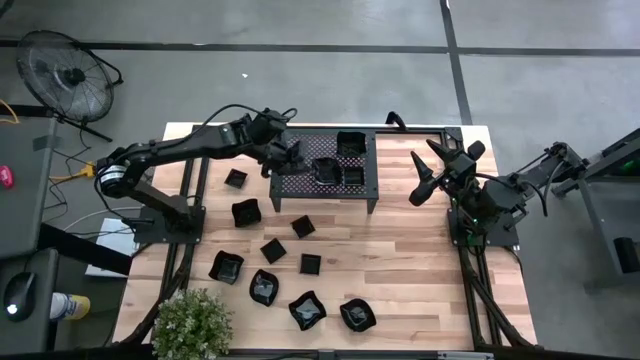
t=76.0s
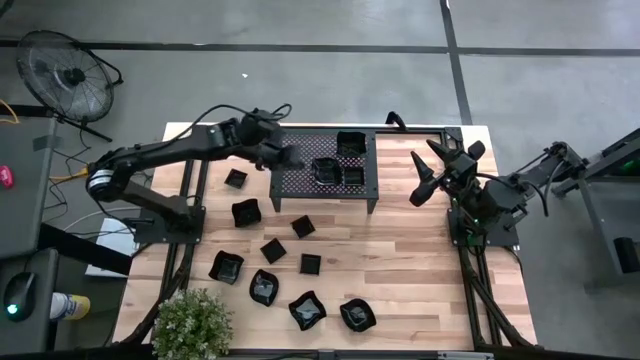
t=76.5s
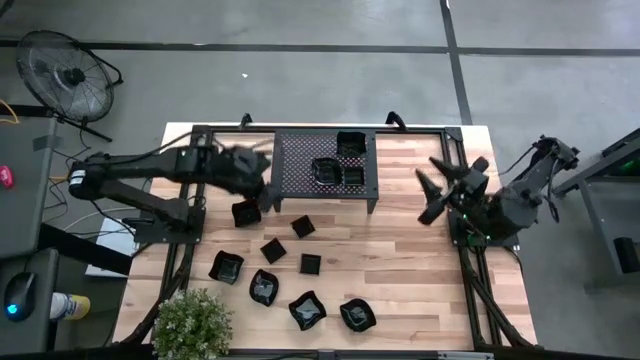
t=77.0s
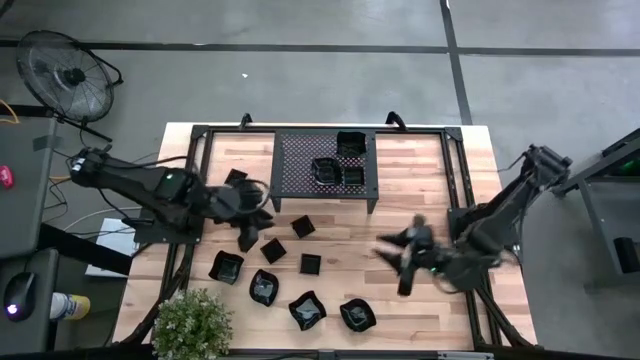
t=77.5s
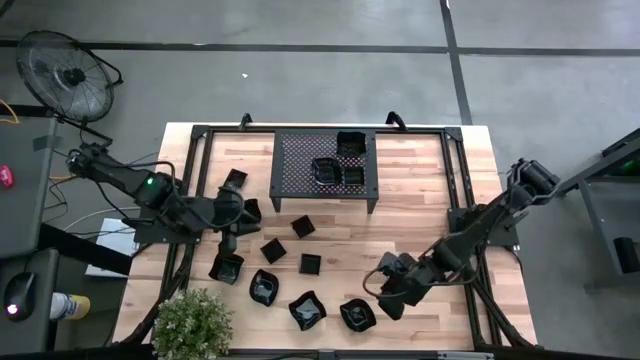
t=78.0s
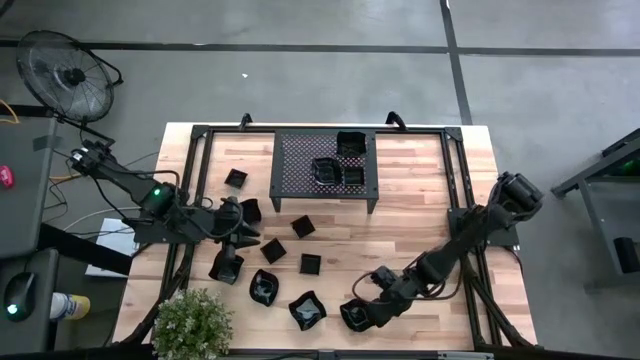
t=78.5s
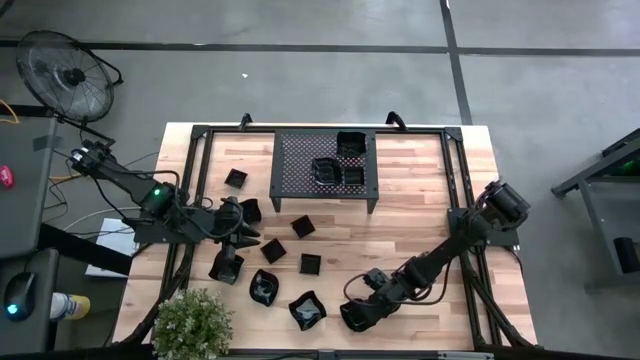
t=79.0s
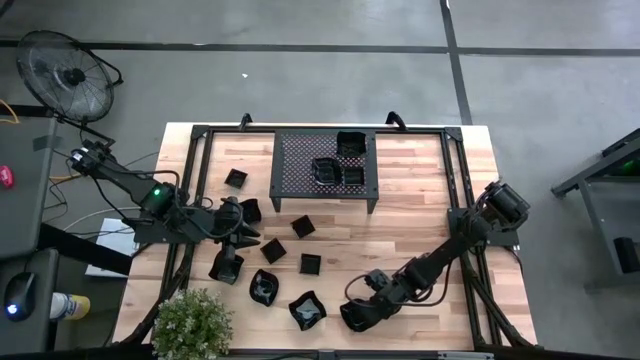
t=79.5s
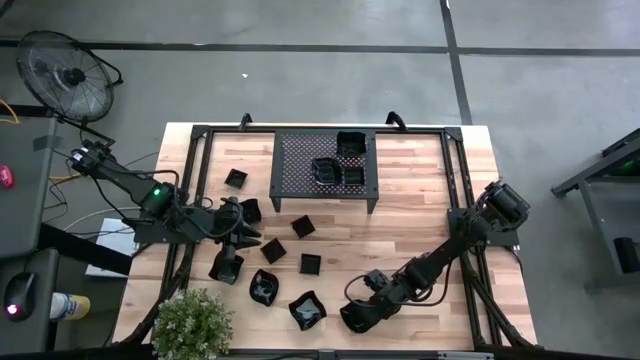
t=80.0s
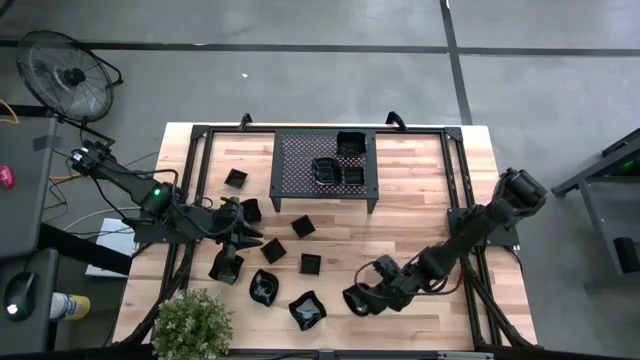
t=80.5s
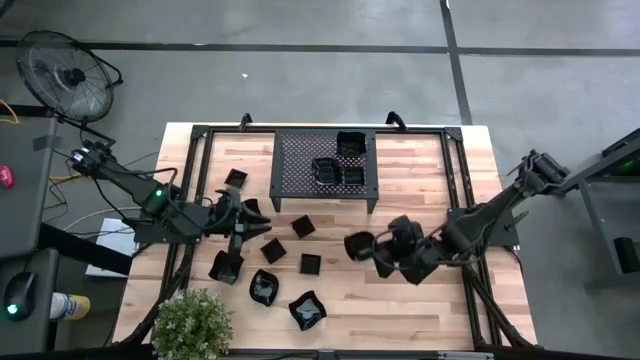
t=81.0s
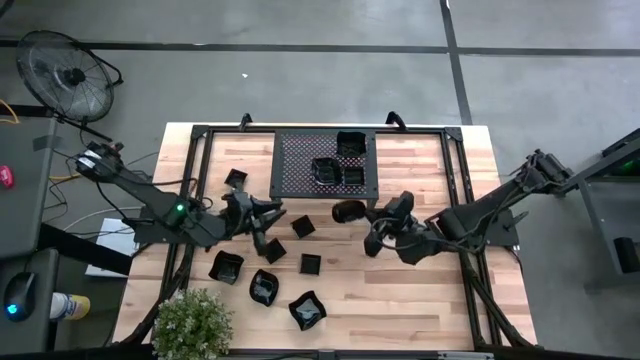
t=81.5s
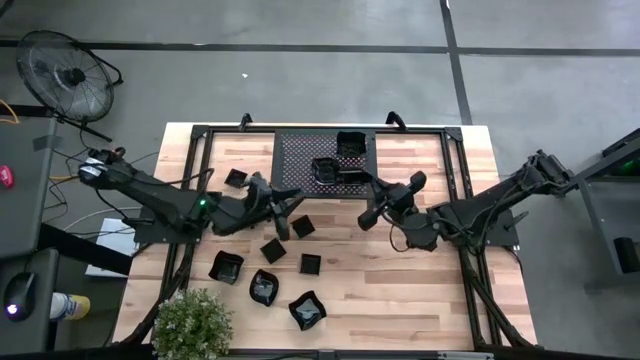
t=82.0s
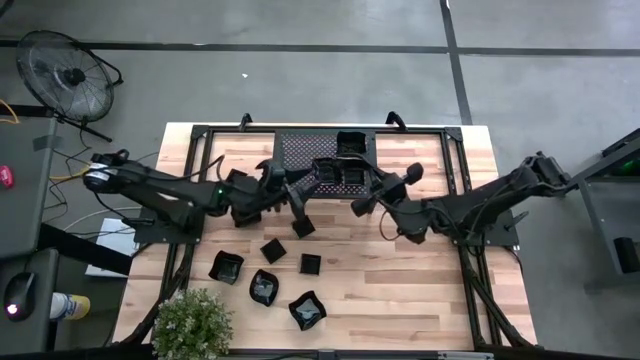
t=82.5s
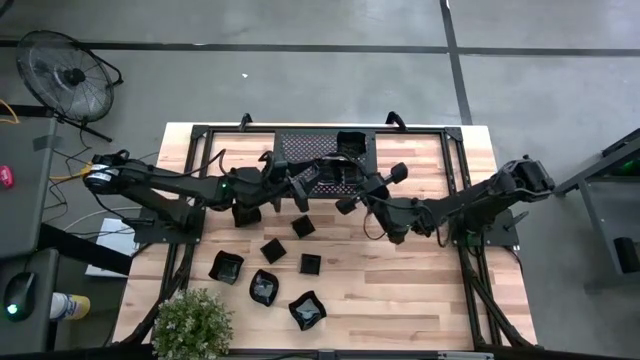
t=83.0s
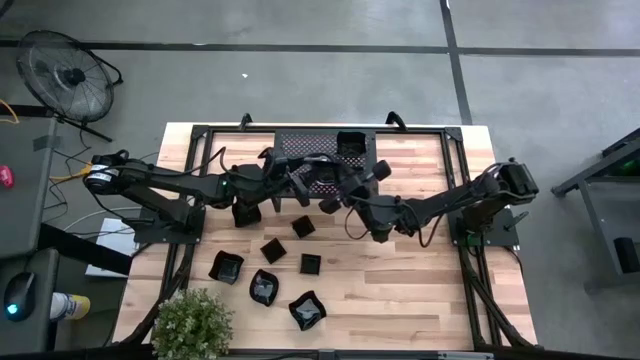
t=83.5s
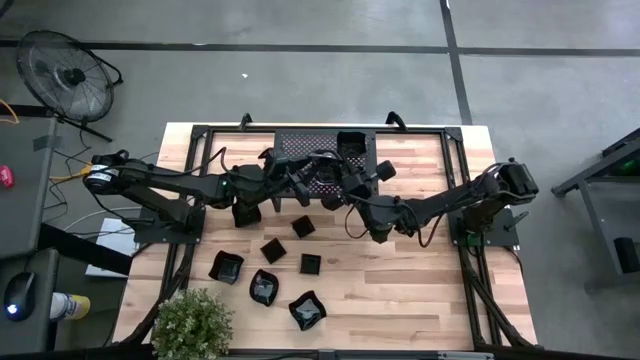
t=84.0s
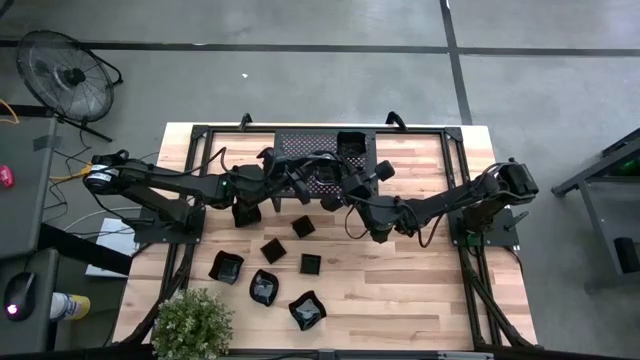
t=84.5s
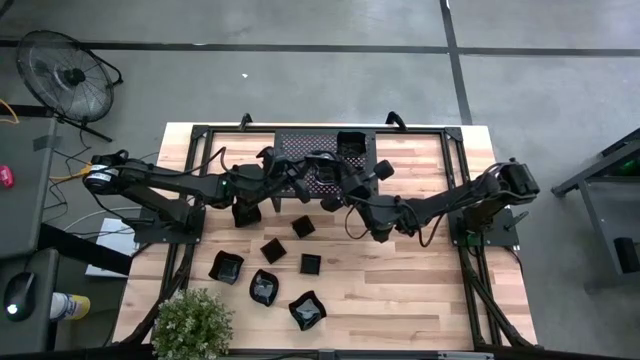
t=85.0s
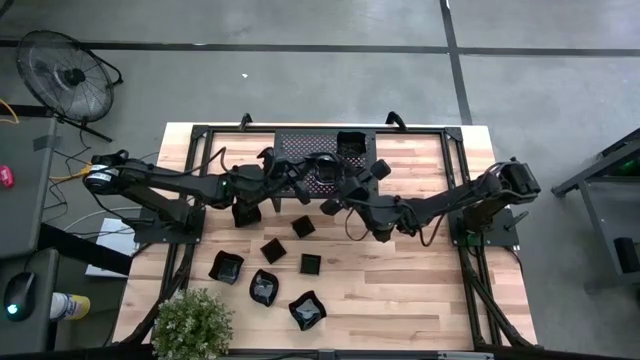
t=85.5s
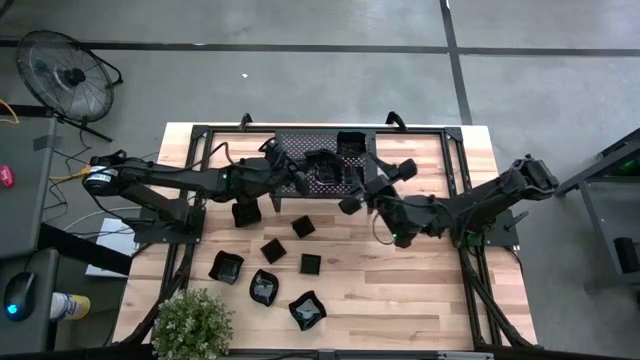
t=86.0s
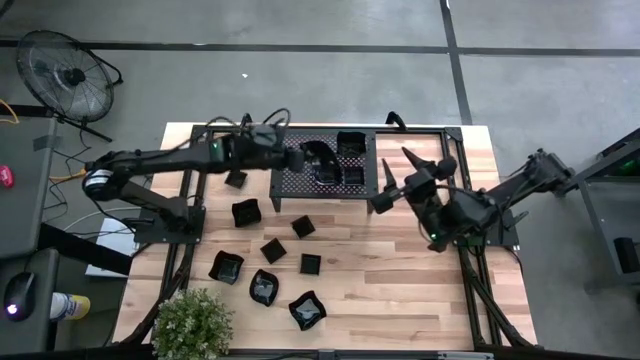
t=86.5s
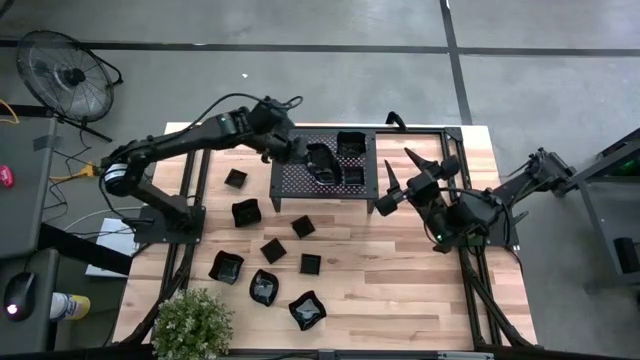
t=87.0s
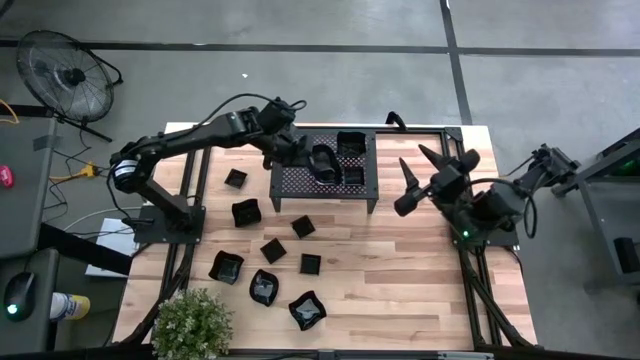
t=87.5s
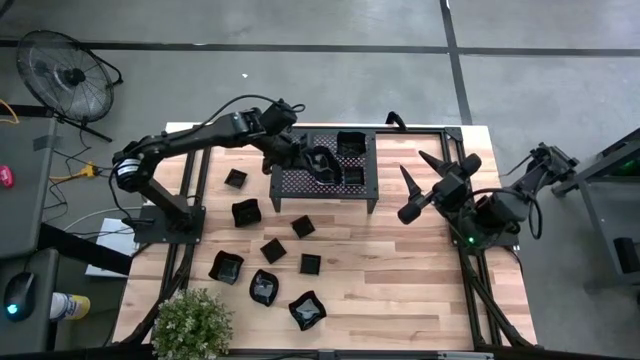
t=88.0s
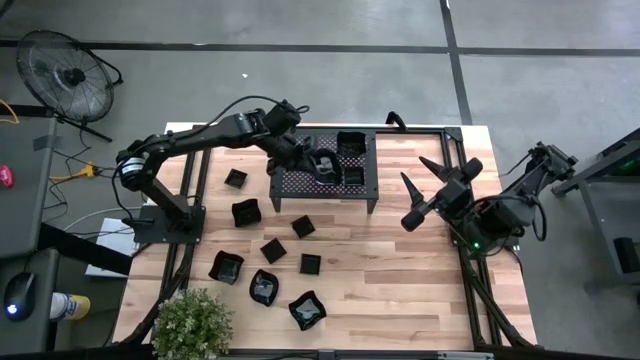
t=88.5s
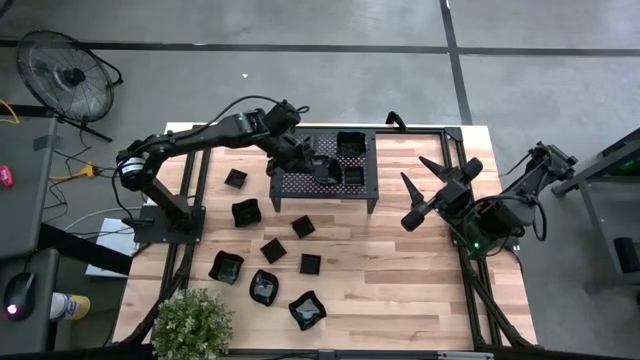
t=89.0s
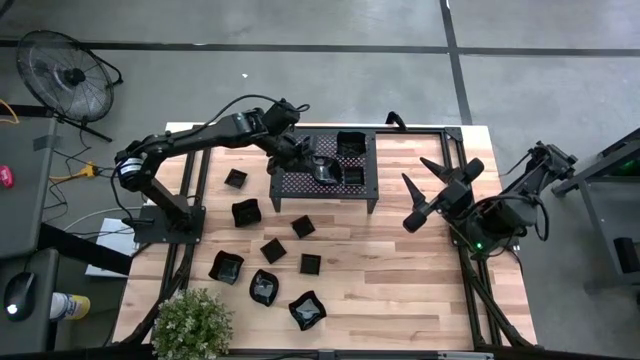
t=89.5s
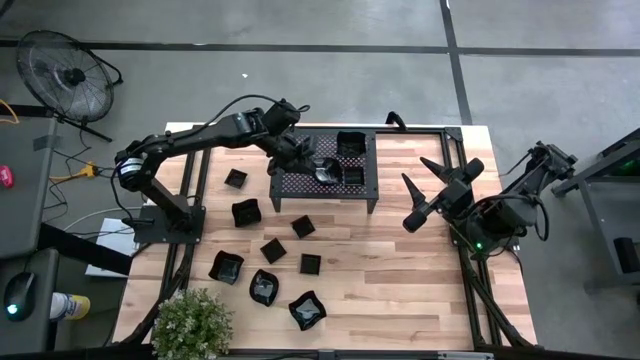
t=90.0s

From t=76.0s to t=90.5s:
Task: Pick & Place Mini shaped plates
Stack the black leaf-shaped plate on top of the other black leaf-shaped plates on the shelf

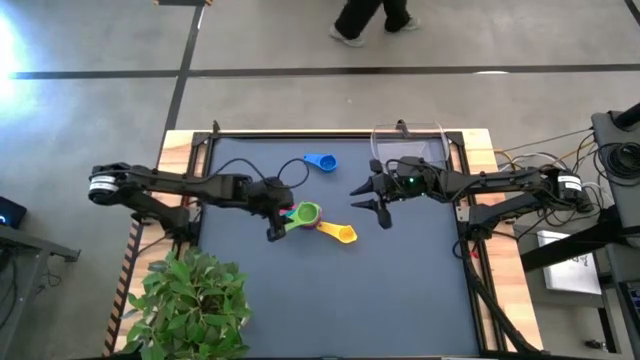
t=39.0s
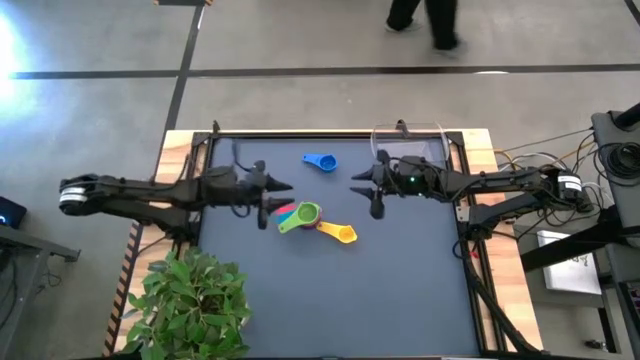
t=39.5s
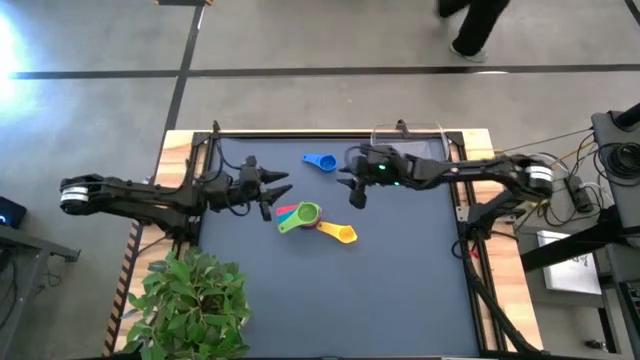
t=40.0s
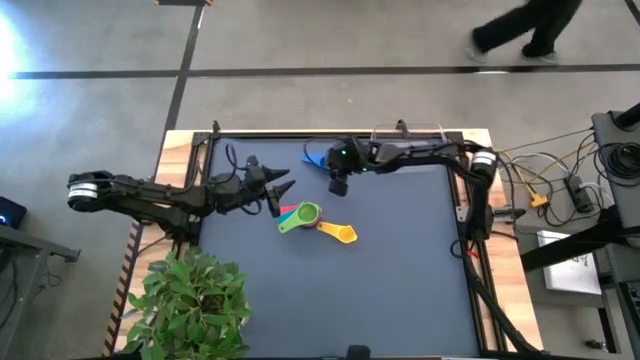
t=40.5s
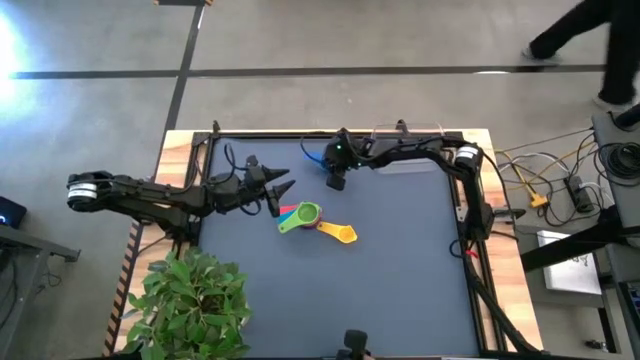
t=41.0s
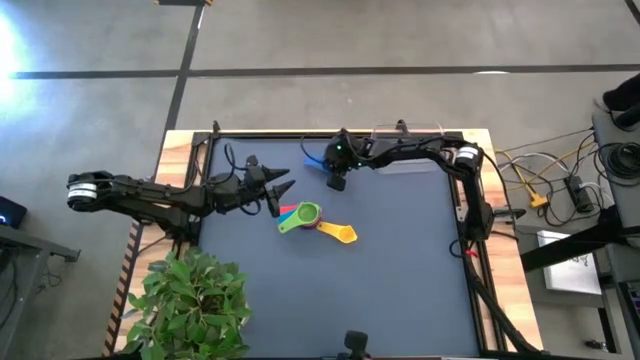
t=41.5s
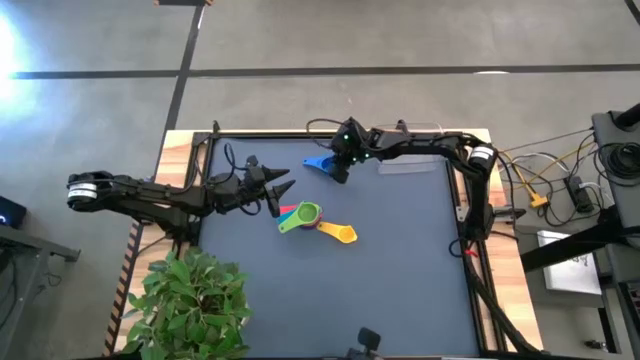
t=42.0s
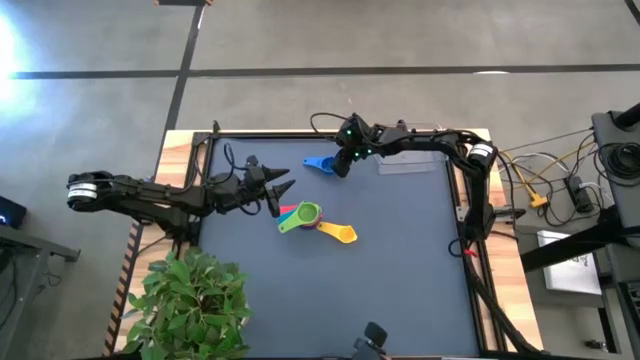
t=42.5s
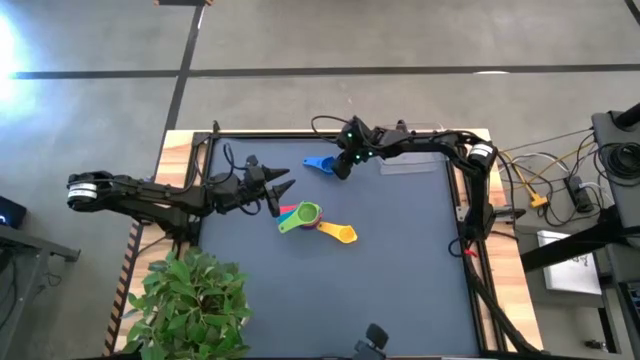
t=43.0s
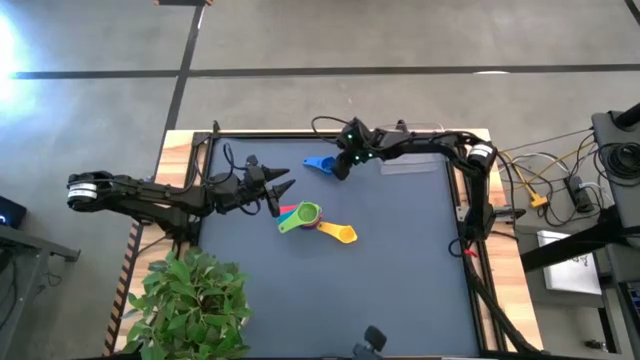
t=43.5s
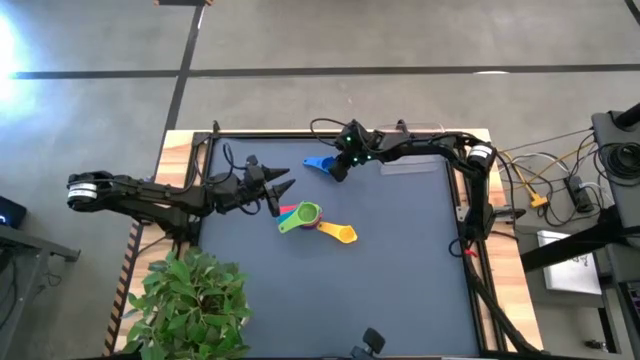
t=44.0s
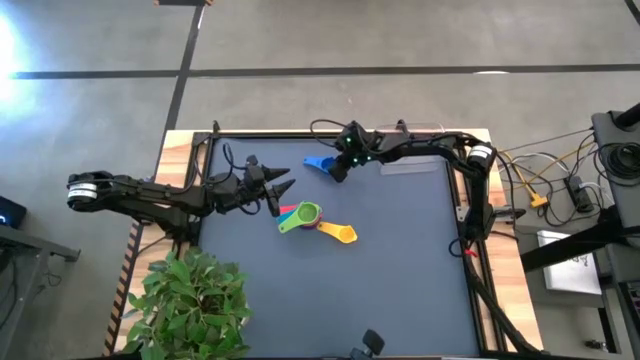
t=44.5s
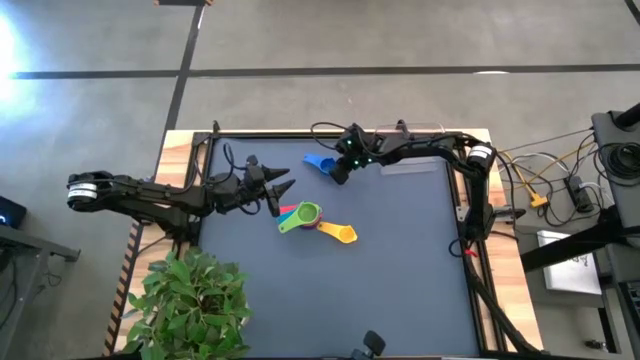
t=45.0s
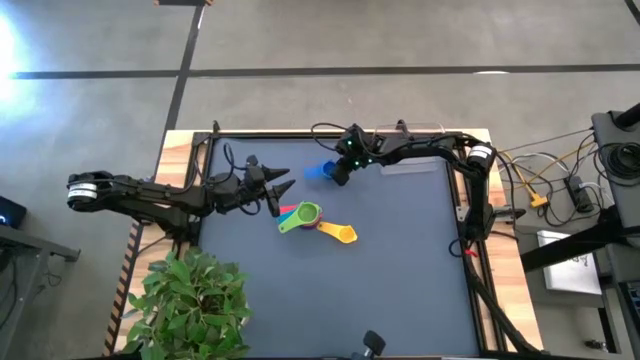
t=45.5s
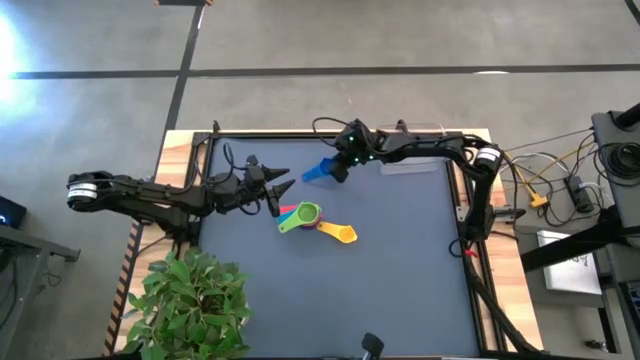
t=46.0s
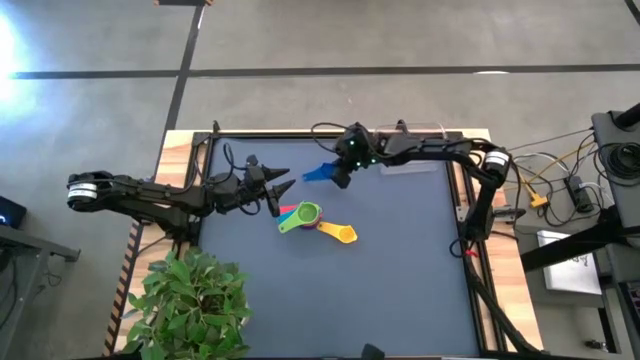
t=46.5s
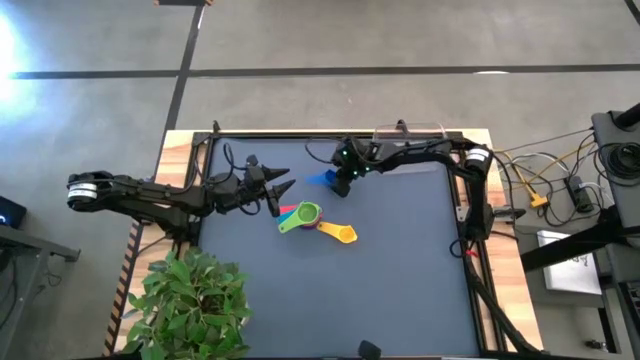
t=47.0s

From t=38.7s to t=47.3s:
Task: Nest measuring cups in basket
Stack the blue measuring cup on top of the green measuring cup
